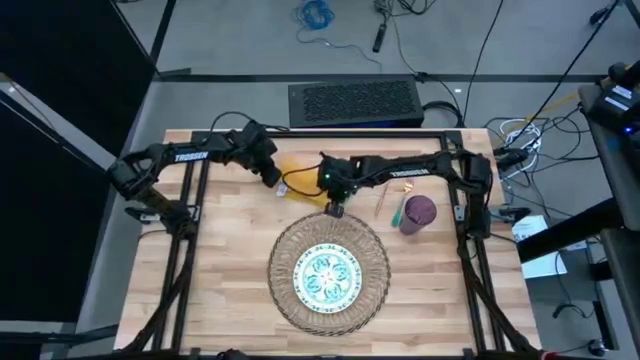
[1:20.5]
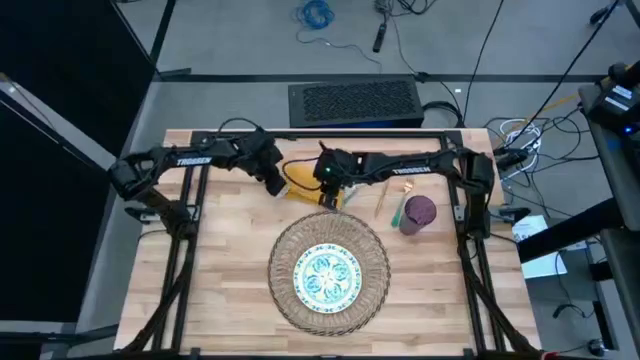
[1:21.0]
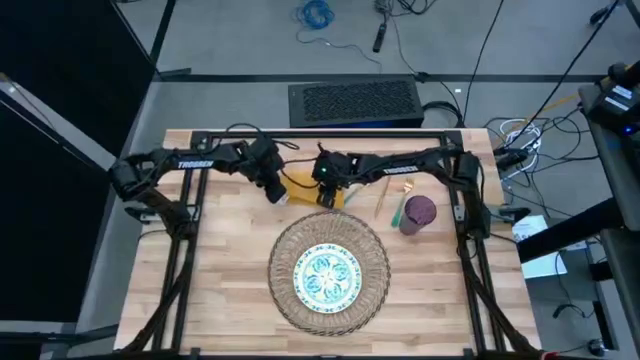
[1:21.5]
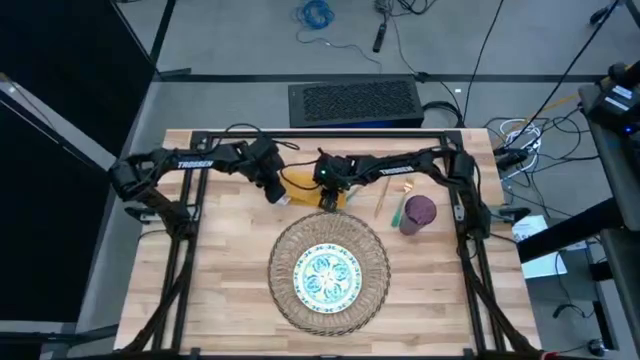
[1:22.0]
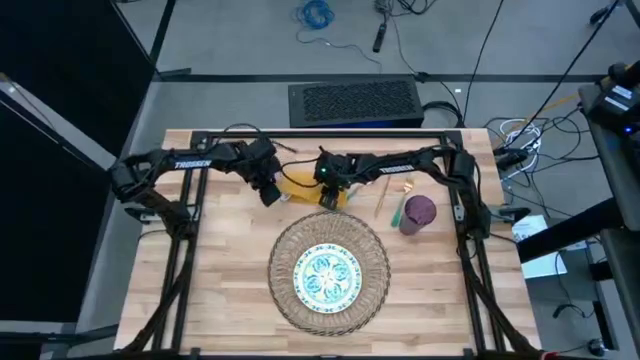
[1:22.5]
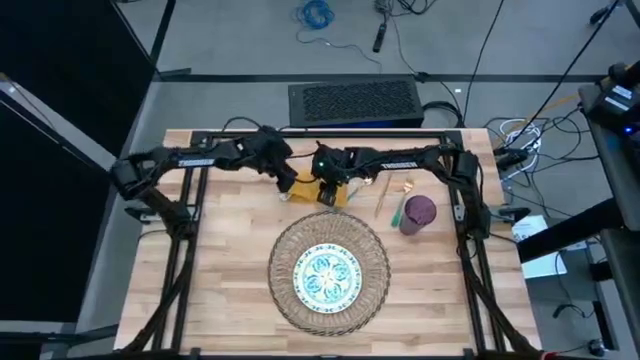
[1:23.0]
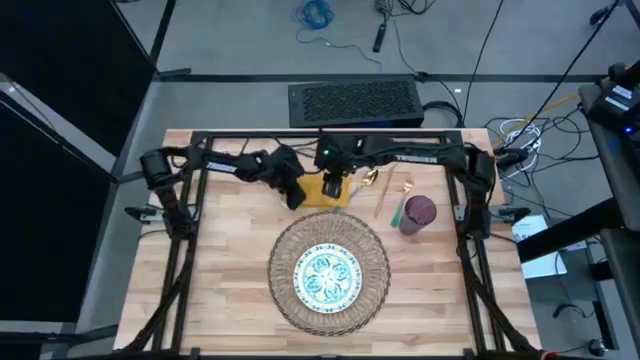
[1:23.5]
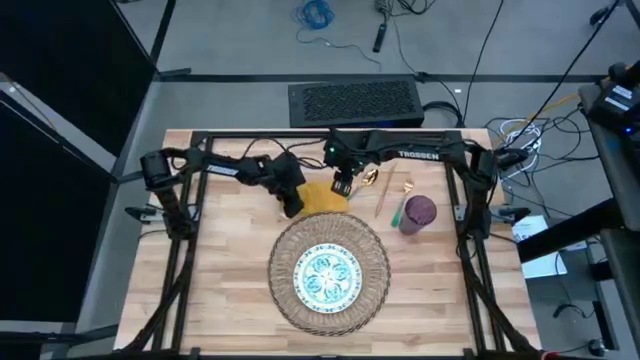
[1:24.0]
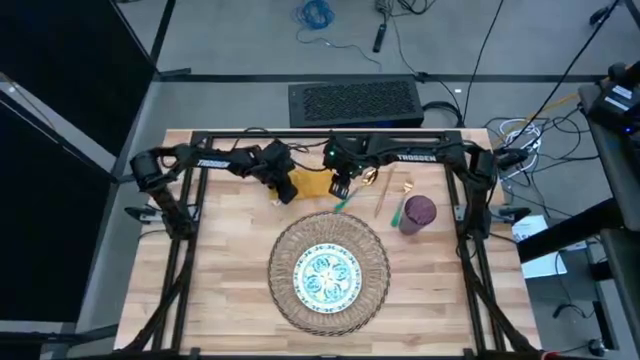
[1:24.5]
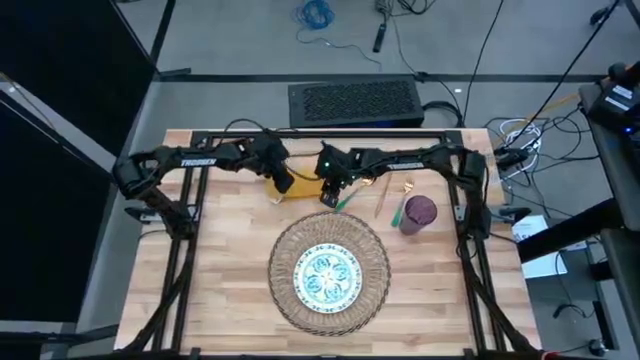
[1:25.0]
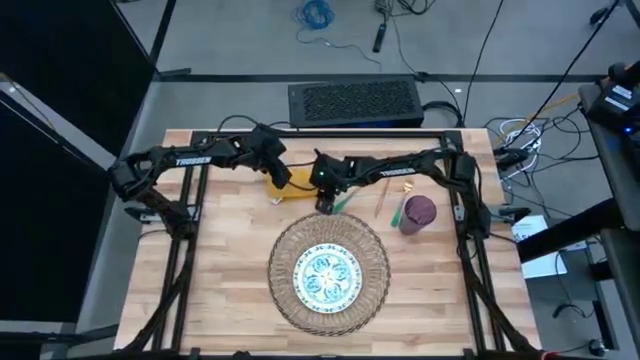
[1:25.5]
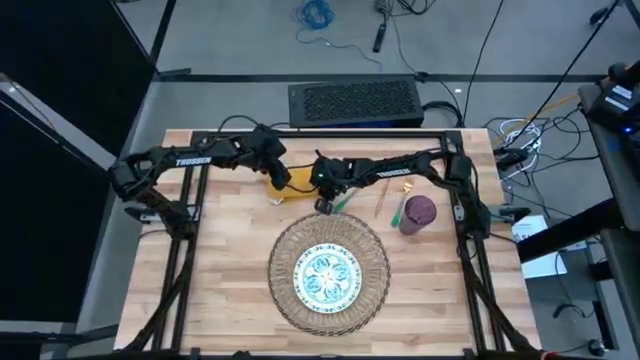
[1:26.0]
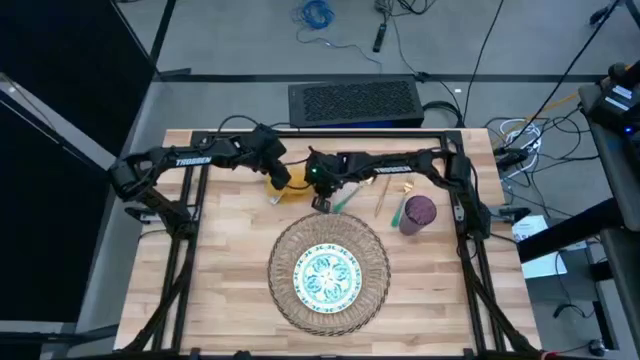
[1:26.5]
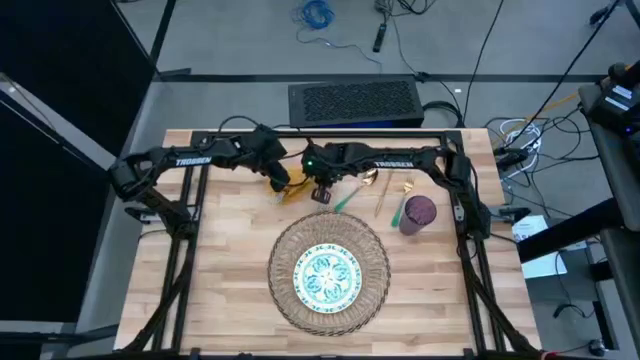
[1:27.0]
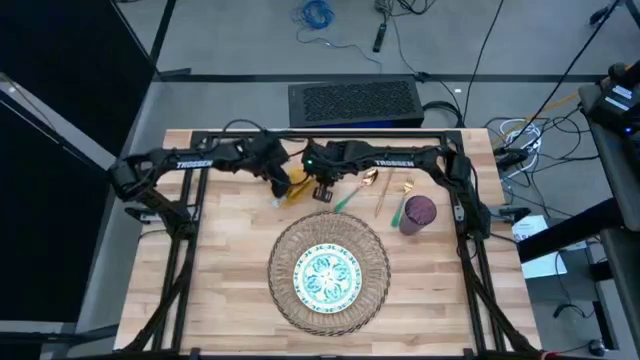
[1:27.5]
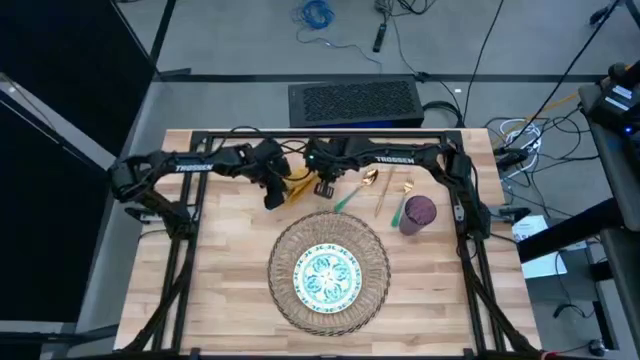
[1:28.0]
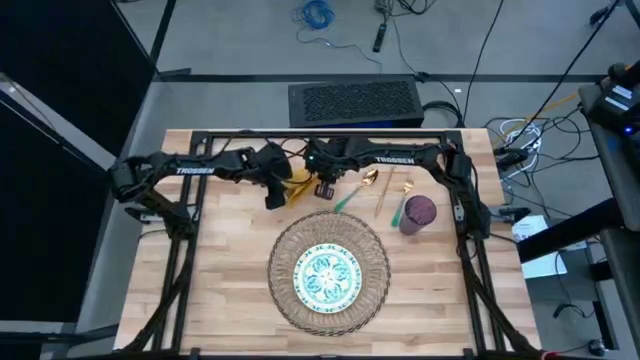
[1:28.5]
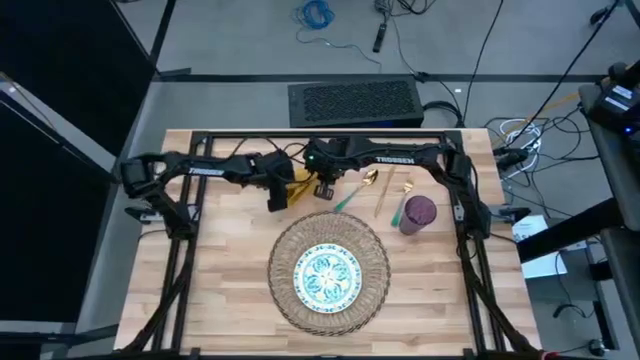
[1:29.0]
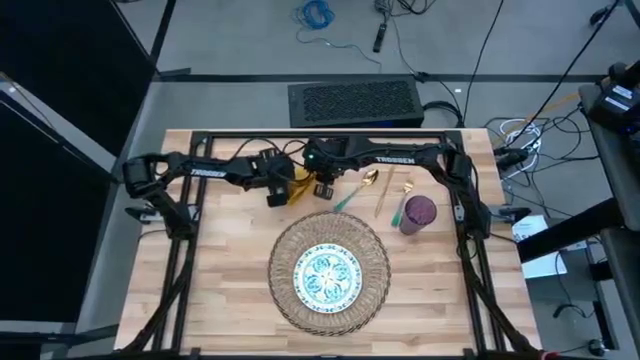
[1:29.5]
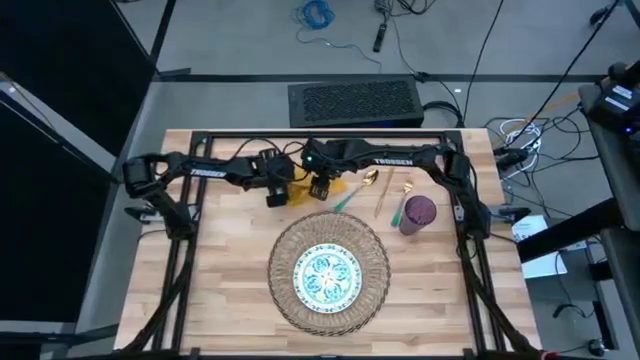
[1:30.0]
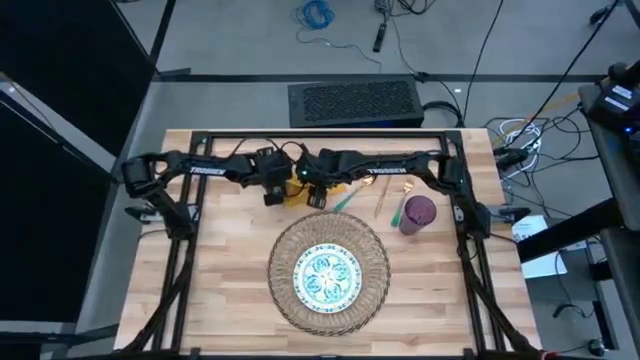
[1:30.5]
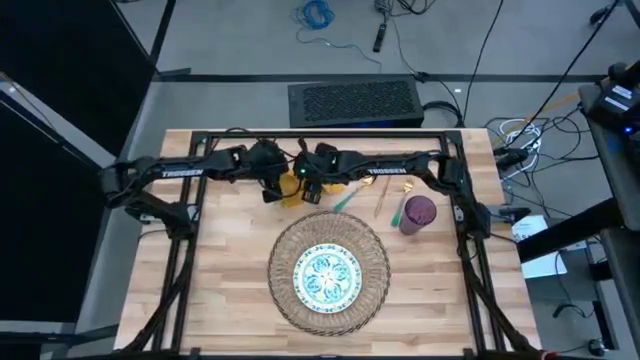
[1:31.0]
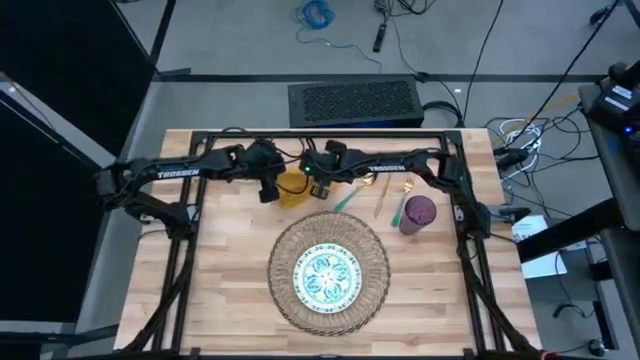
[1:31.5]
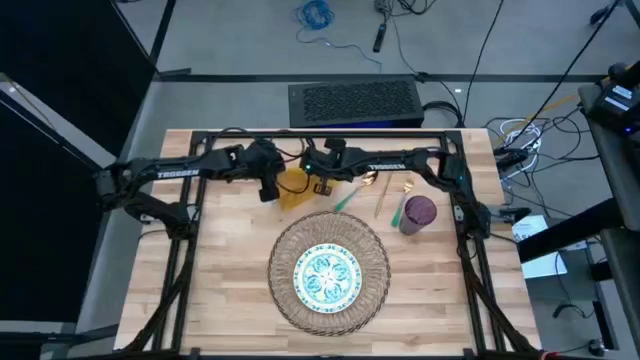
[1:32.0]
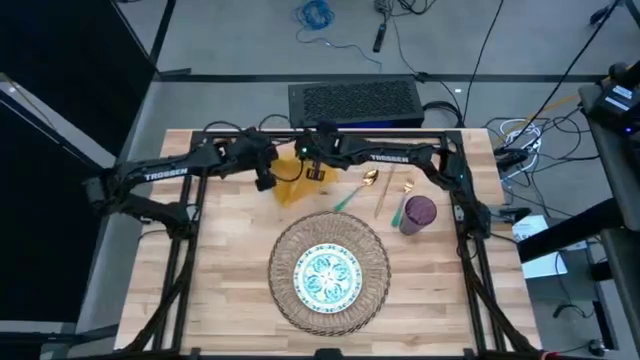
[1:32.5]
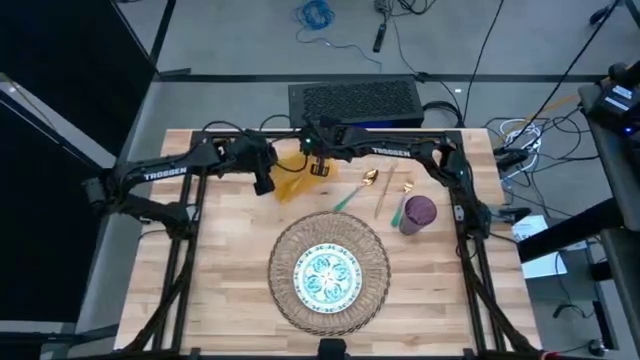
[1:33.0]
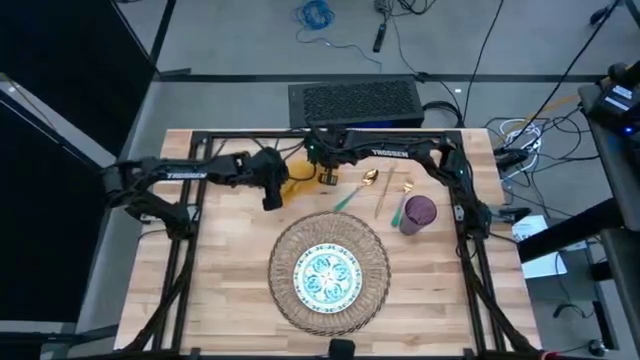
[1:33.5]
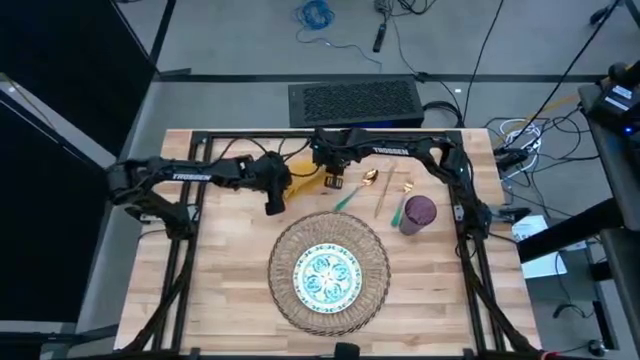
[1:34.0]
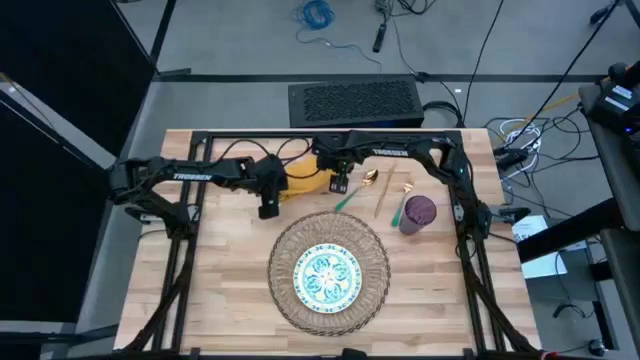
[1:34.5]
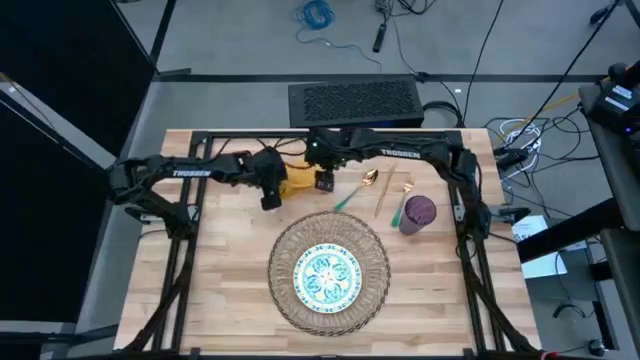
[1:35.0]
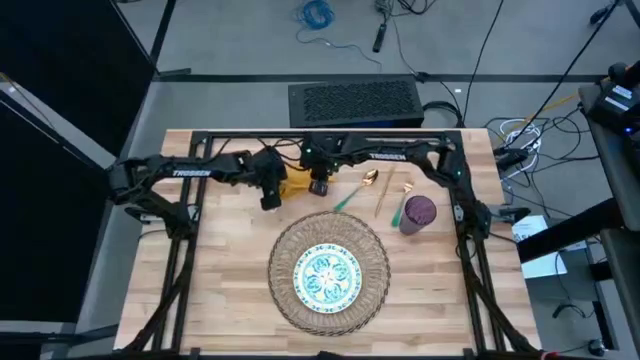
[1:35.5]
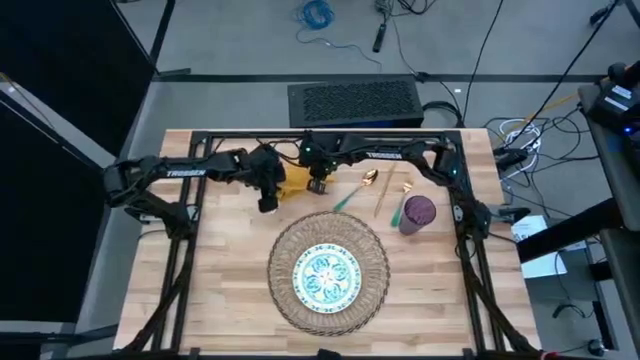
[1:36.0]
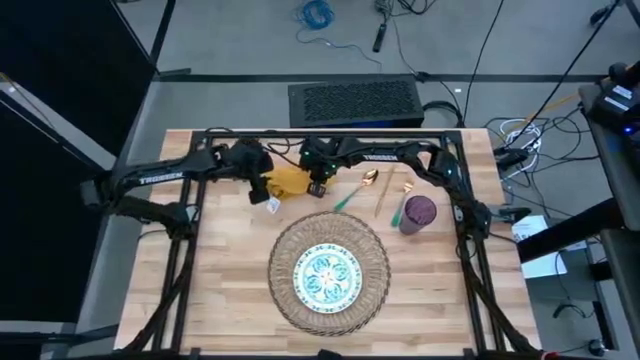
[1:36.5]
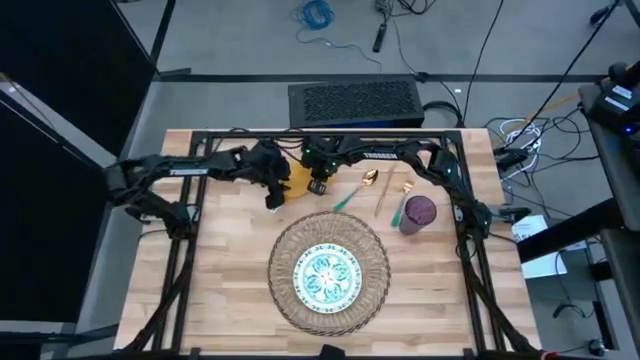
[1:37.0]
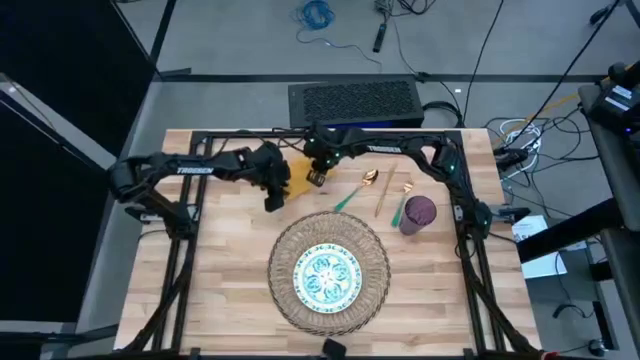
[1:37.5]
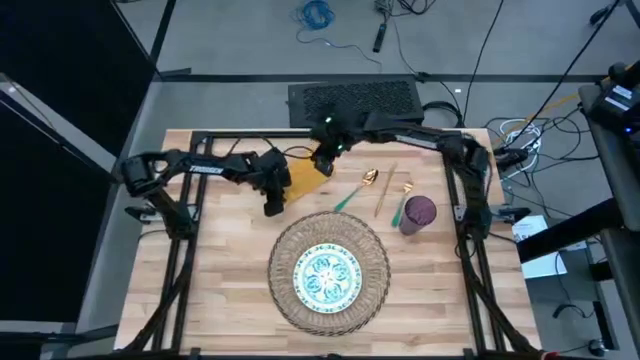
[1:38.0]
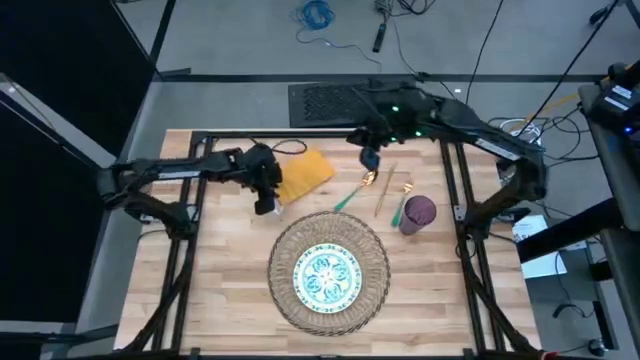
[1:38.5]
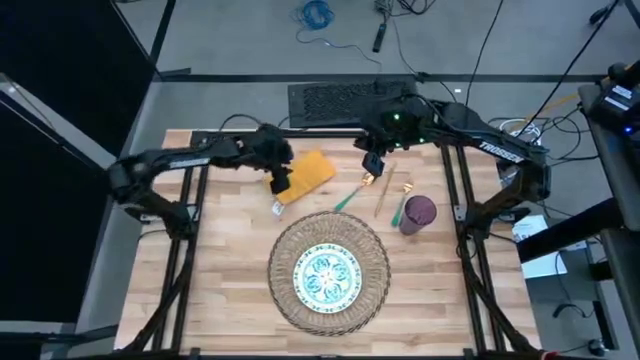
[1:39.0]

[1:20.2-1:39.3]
Task: Set table place
Fold the yellow table napkin

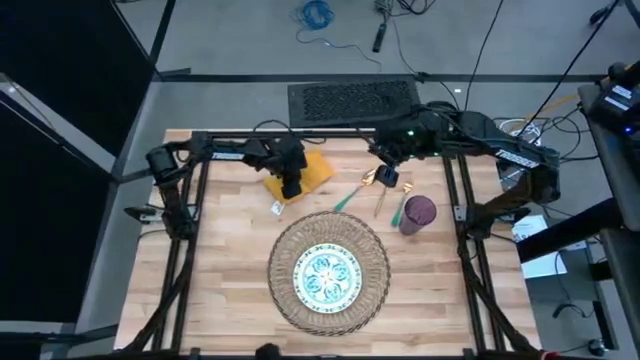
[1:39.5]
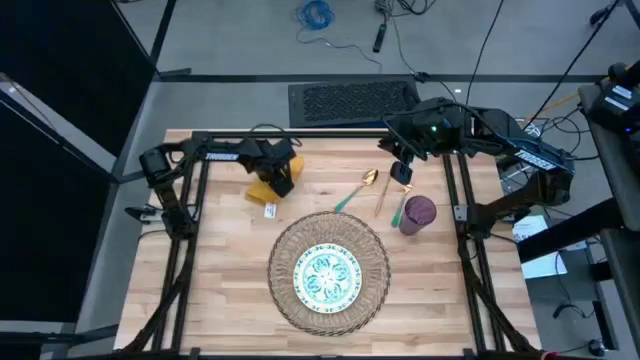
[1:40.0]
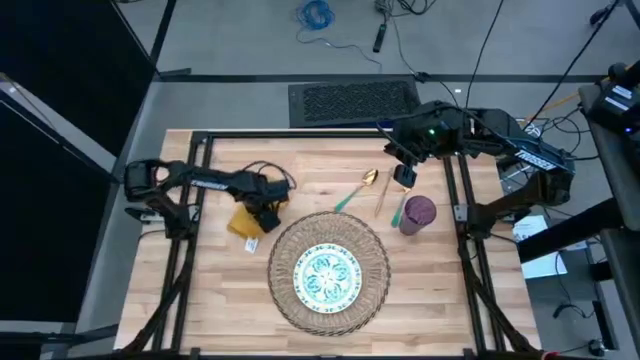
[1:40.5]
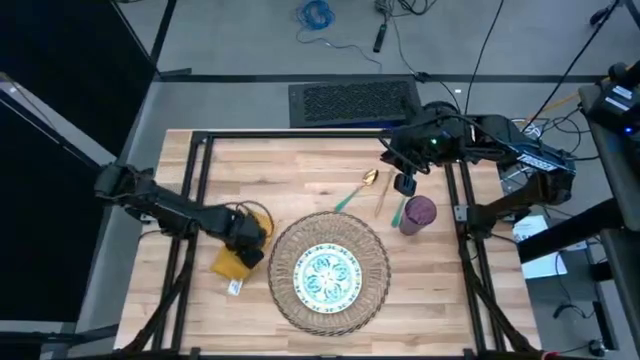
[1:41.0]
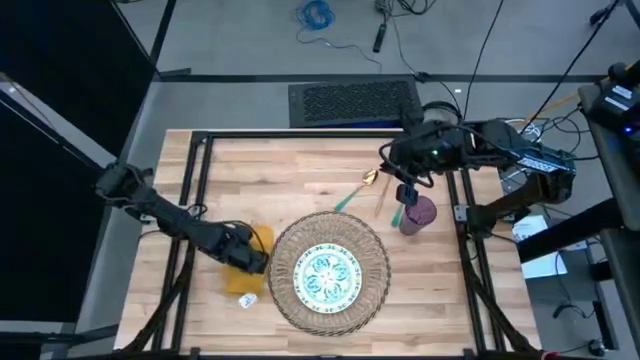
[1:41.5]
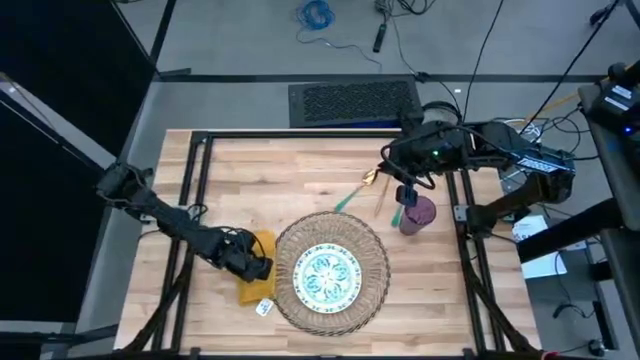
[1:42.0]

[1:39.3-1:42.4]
Move the folded yellow table napkin to the left of the brown table mat
